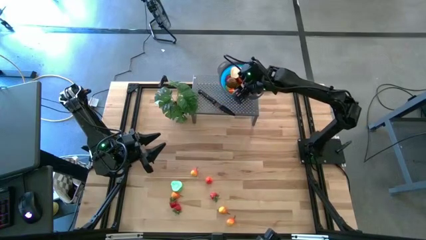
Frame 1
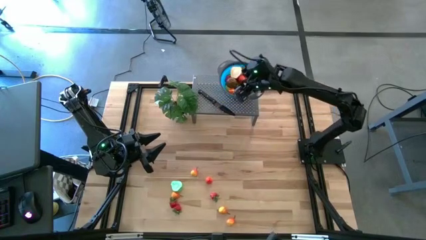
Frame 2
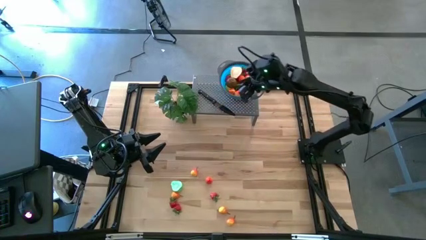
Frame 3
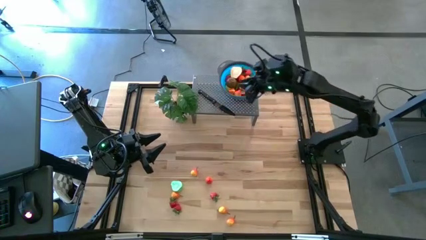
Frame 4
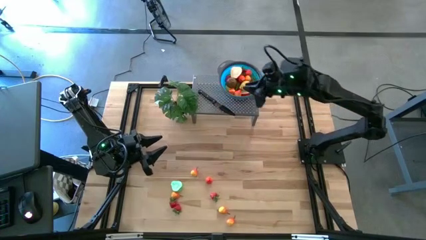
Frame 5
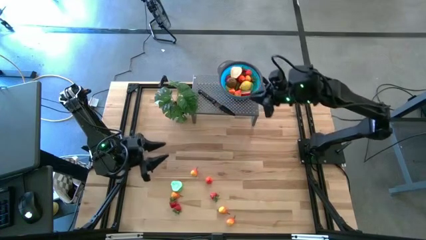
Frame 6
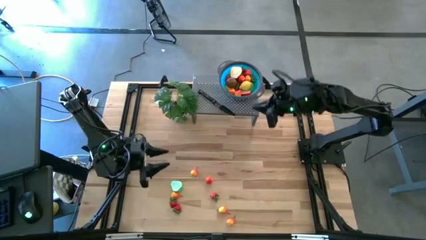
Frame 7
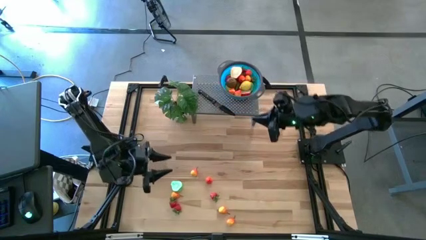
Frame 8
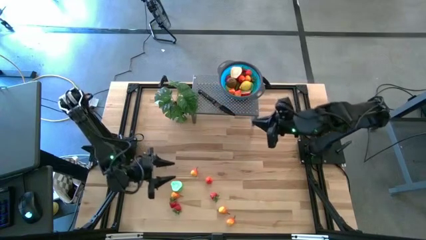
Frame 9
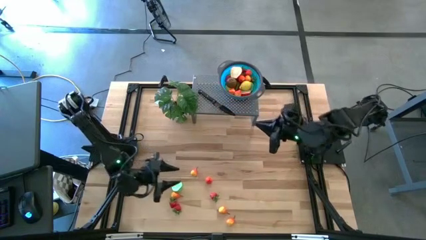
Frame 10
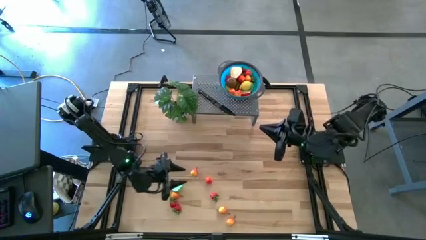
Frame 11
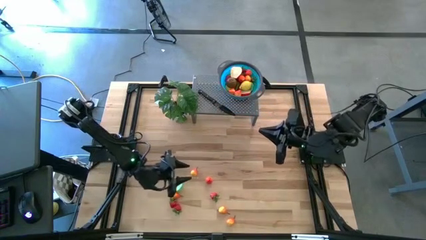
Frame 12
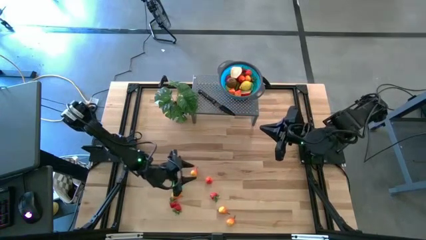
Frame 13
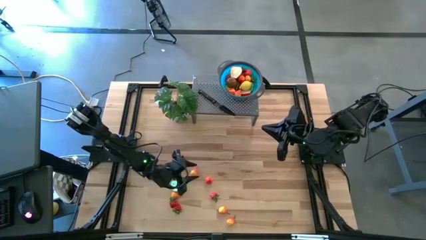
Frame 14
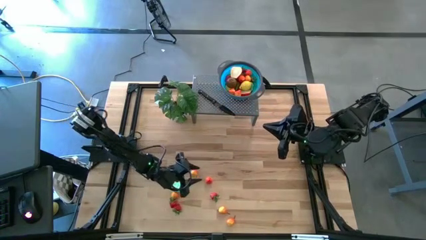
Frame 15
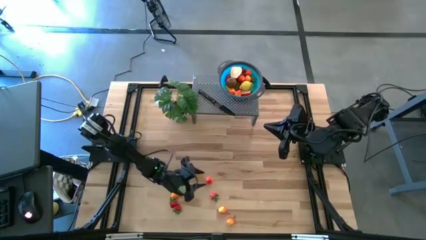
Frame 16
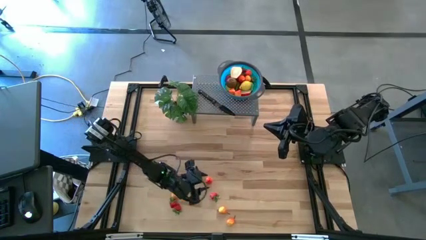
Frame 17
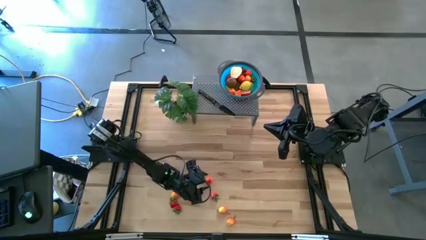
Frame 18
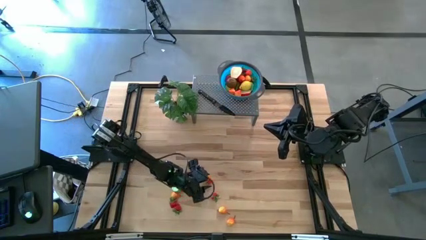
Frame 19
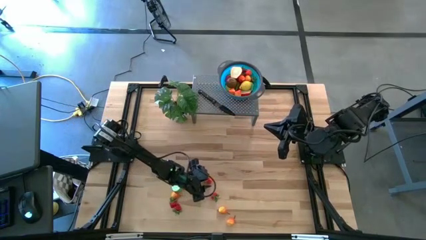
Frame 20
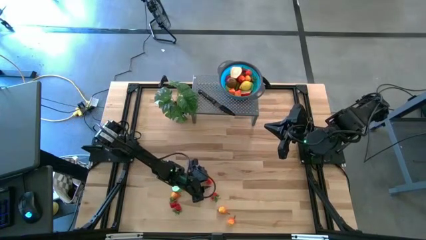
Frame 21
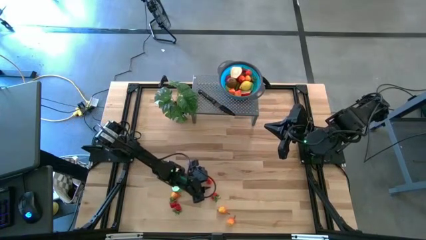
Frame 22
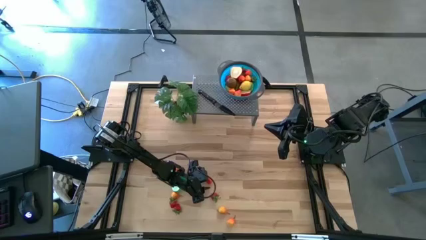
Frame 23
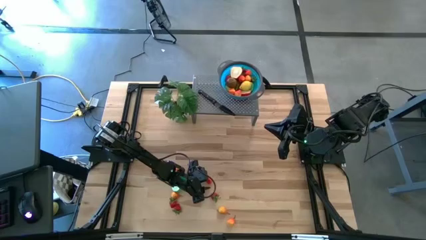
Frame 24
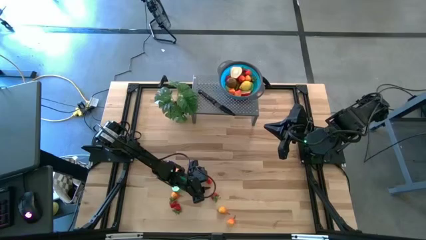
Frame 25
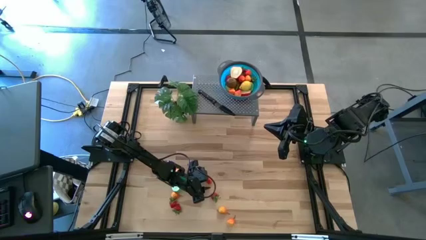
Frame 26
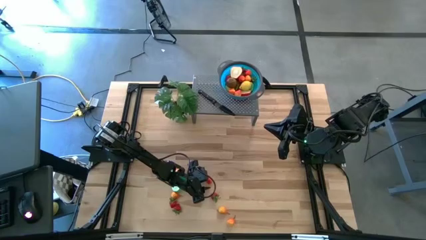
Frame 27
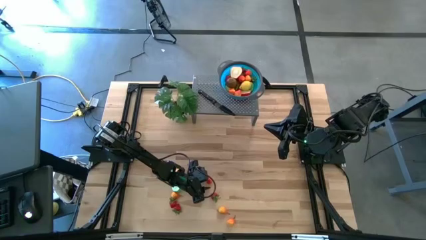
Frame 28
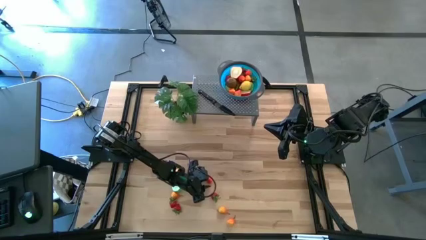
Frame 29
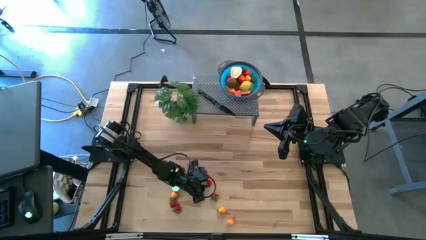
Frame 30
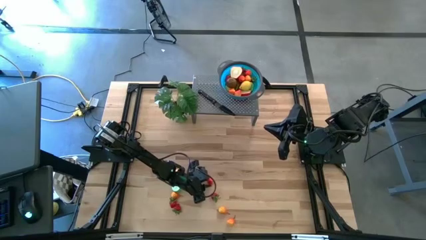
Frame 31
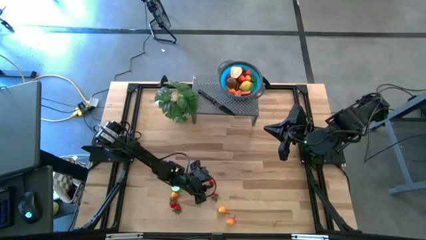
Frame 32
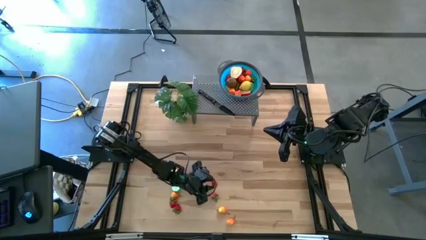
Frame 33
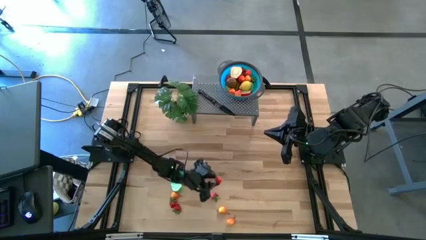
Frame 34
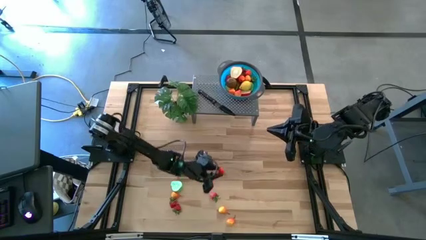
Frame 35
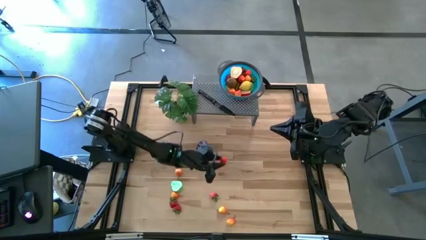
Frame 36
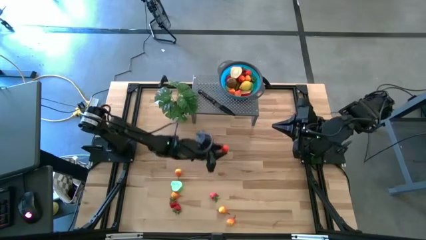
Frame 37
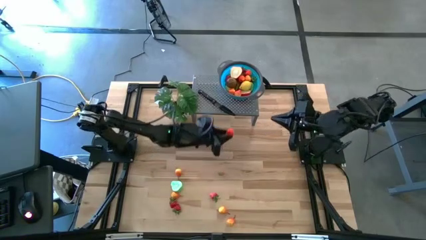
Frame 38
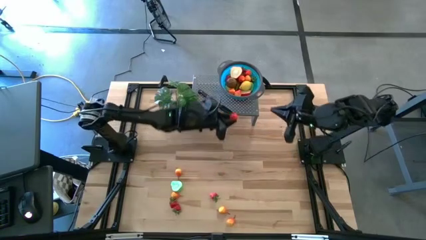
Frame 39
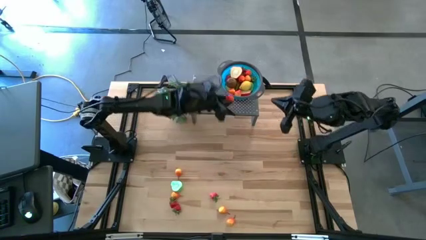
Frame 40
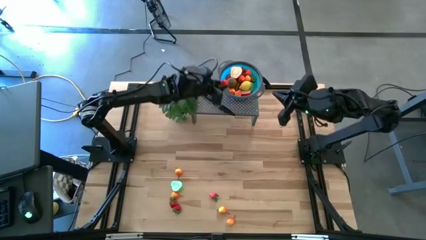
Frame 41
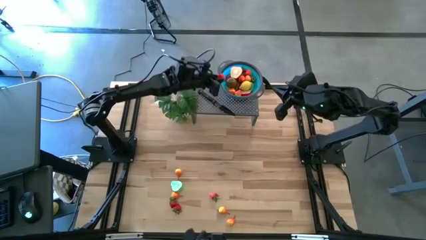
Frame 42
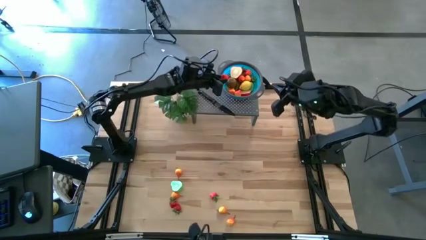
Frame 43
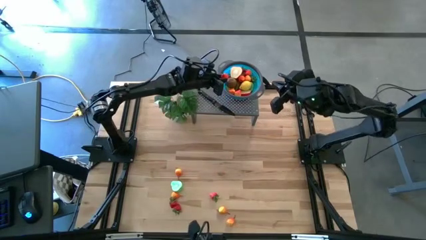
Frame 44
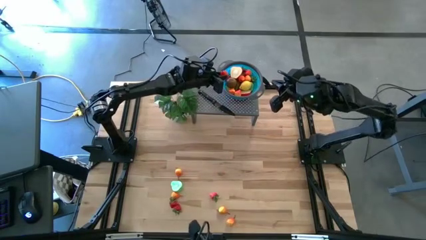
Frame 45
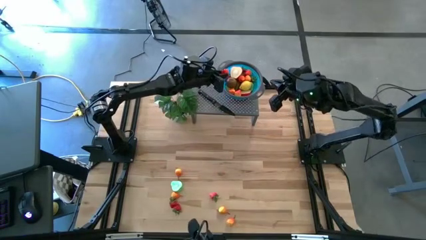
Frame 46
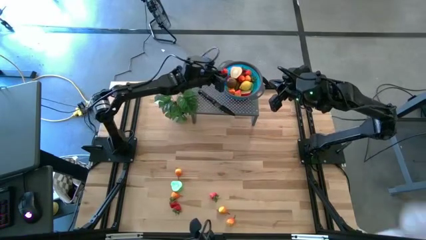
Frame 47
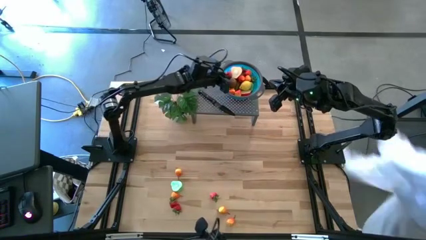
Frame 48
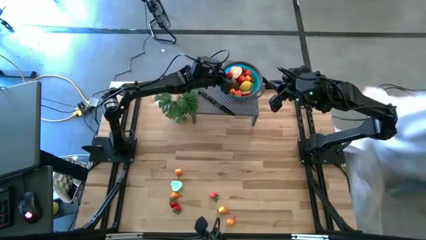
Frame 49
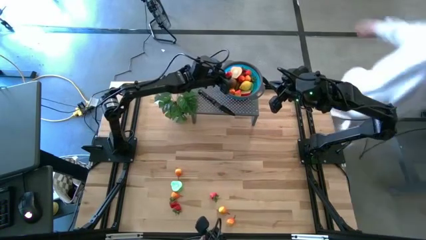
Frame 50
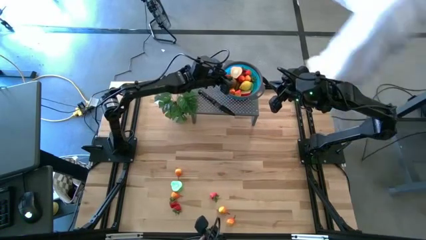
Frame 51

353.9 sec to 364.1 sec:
Task: Pick & Place Fruit
Put the yellow pear in the blue bowl on the shelf

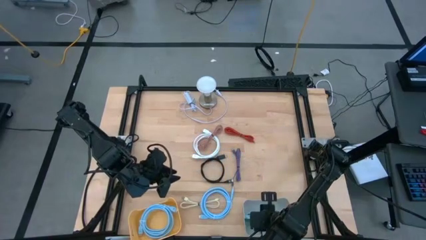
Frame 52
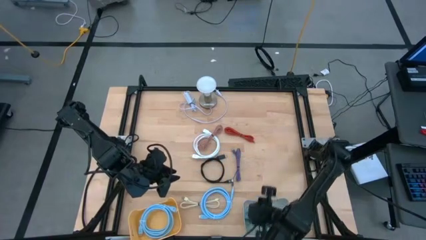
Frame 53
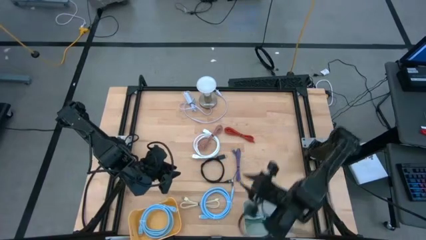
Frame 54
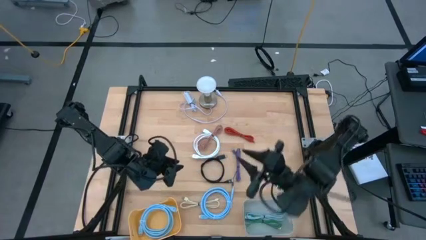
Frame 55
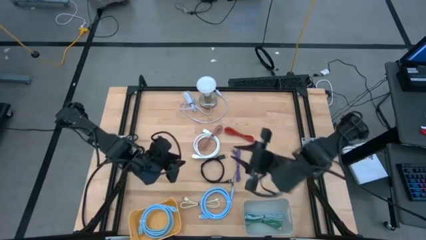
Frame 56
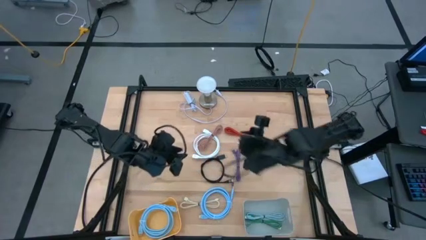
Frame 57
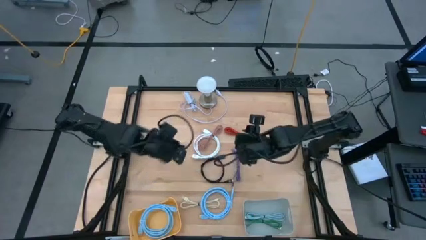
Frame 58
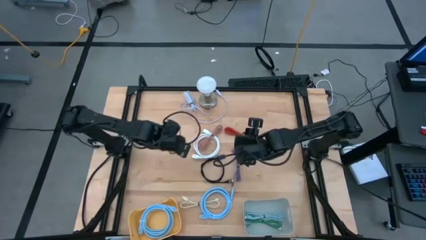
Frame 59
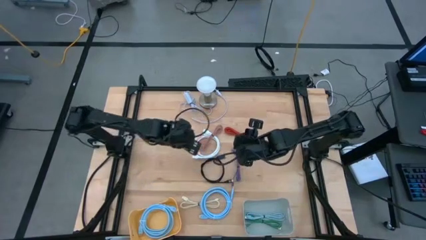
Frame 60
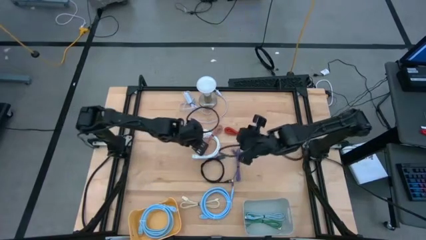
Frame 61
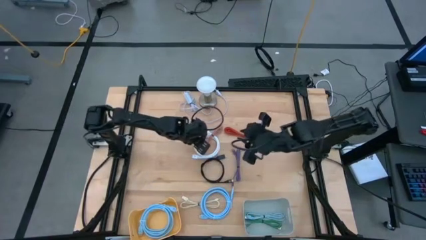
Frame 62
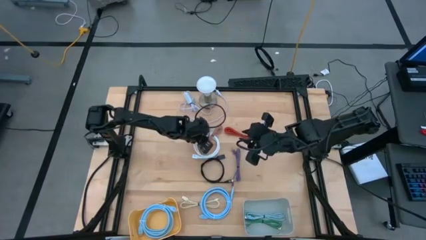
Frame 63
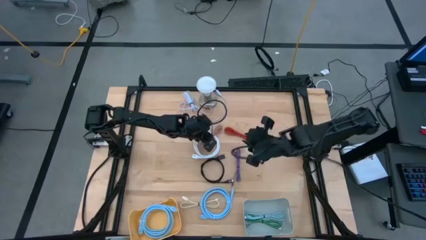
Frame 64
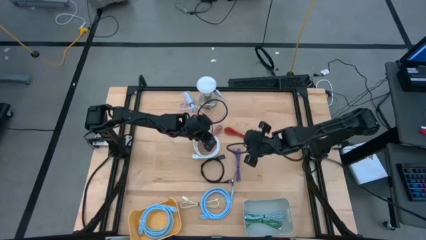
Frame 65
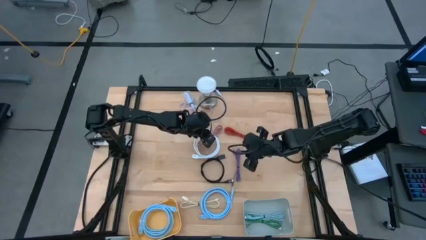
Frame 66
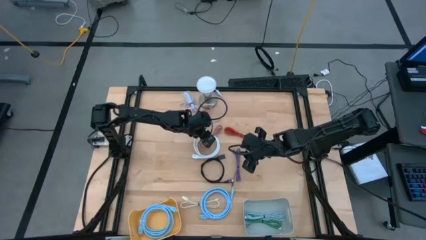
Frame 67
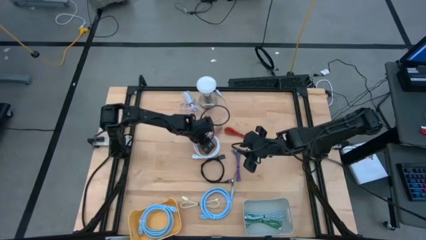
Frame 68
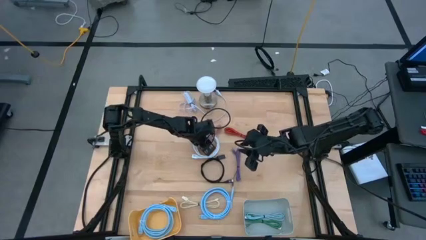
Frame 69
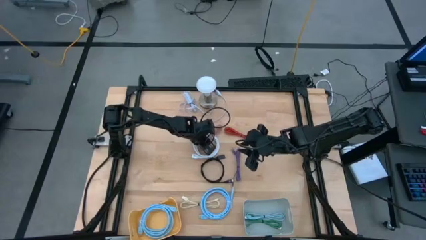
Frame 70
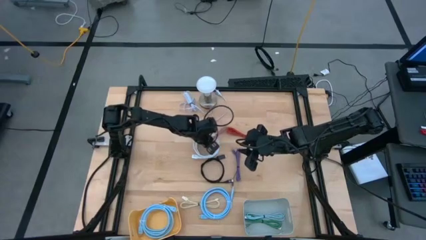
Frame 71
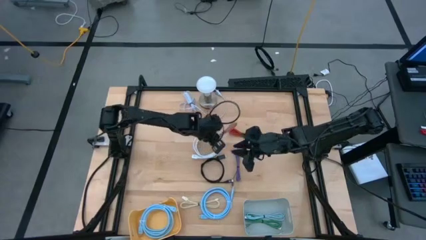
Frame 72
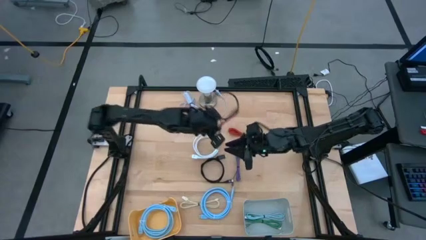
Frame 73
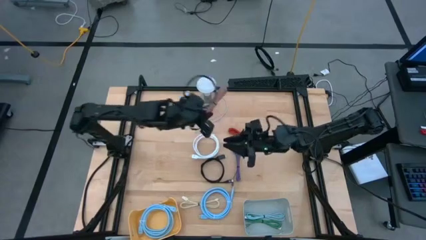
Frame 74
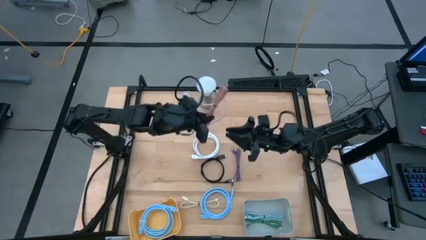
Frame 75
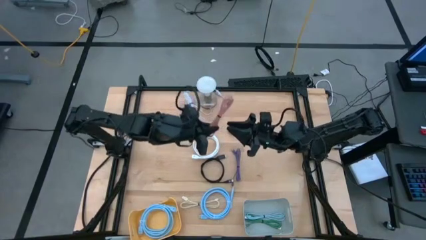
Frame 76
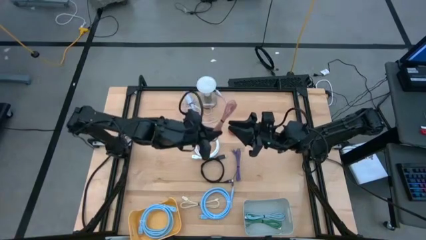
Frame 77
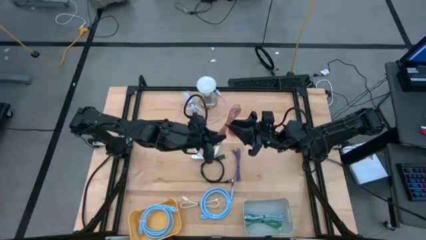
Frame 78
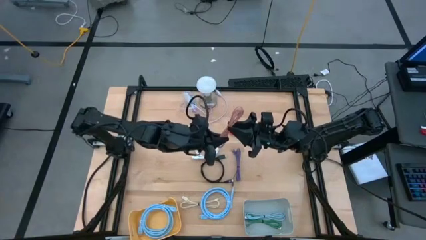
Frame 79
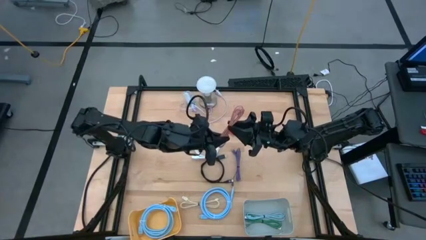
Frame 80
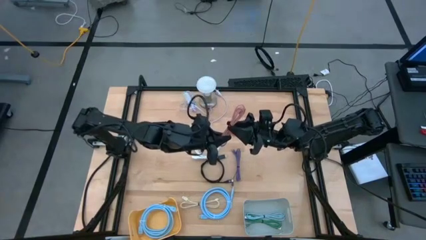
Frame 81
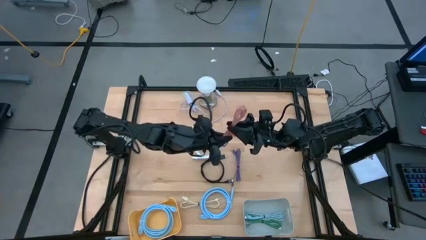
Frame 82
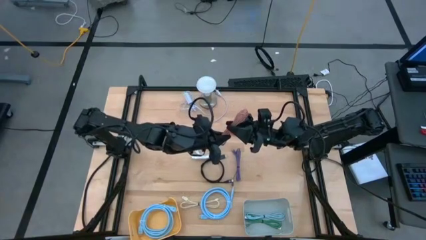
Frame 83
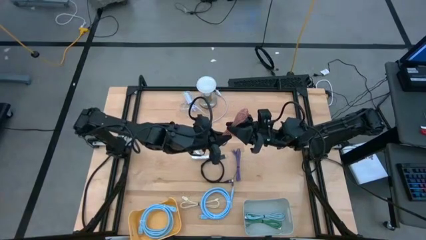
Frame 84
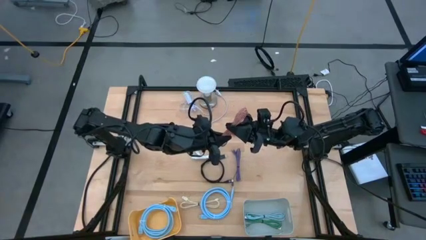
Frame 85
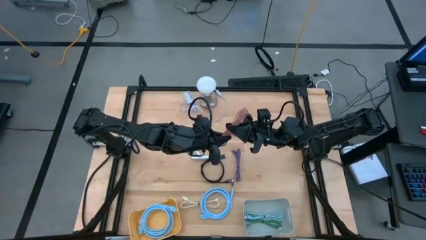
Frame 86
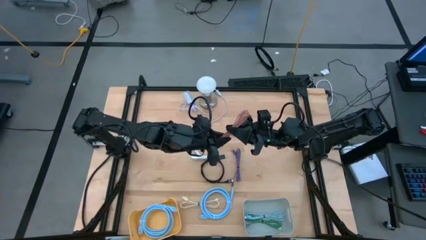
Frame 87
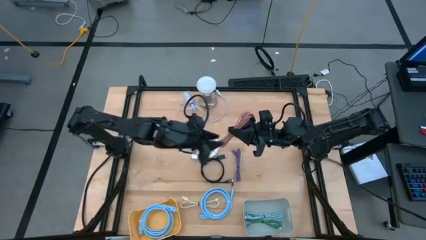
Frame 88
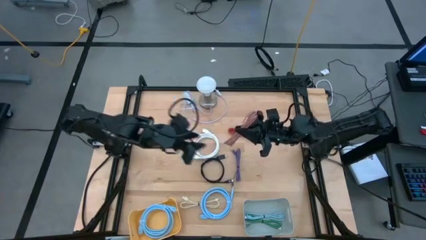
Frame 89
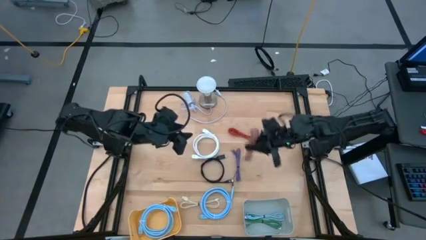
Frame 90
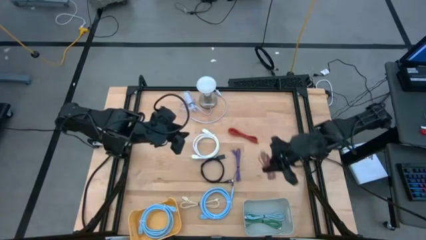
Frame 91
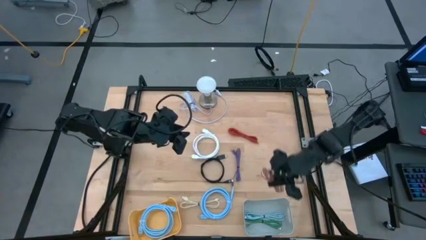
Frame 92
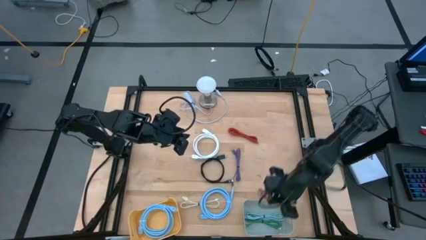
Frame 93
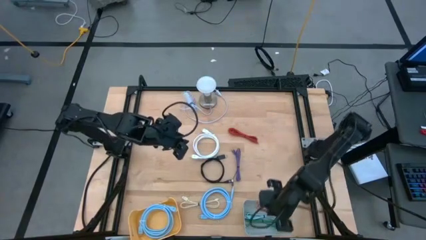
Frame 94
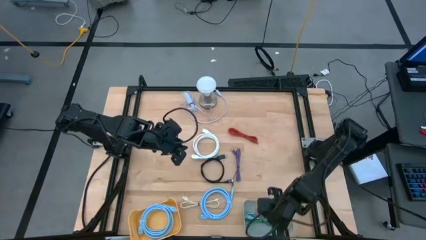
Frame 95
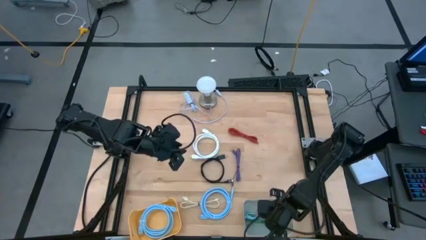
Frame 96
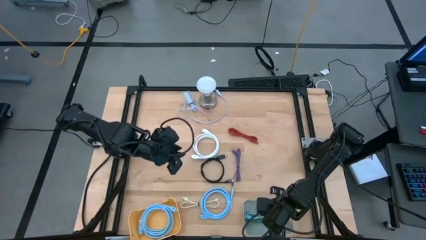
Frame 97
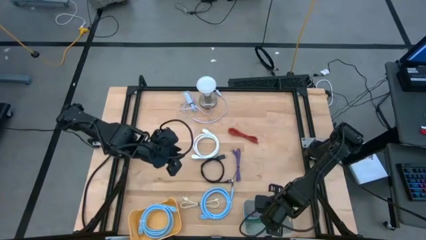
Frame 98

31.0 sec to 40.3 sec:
Task: Pick & Place USB Port
Put the pink charger cable into the gray bin
